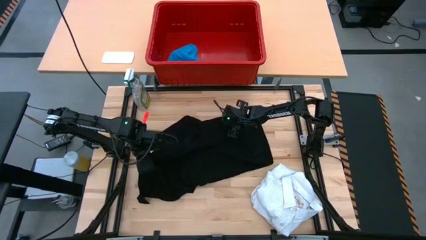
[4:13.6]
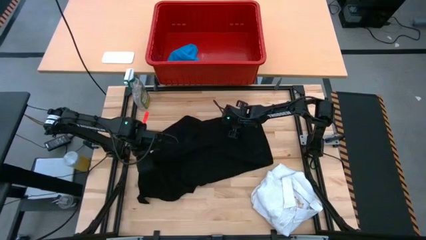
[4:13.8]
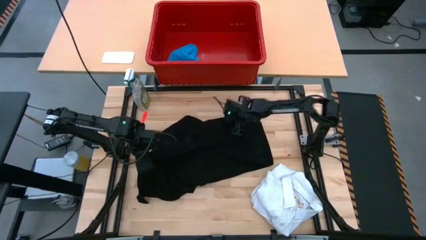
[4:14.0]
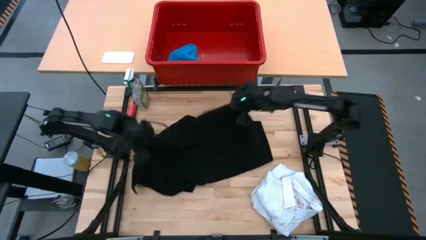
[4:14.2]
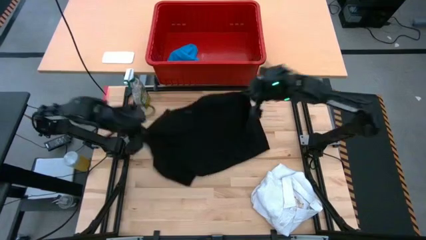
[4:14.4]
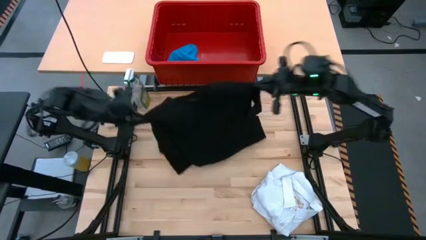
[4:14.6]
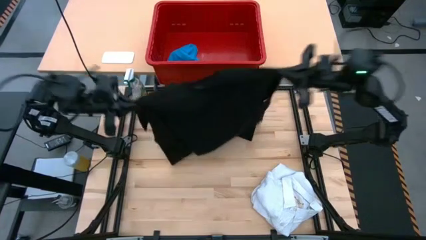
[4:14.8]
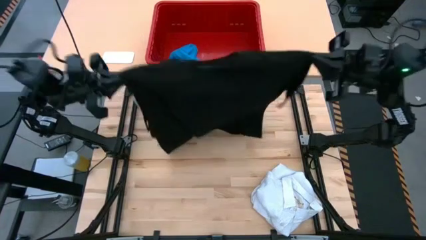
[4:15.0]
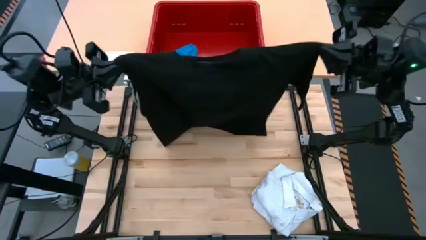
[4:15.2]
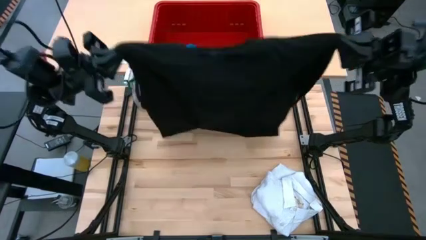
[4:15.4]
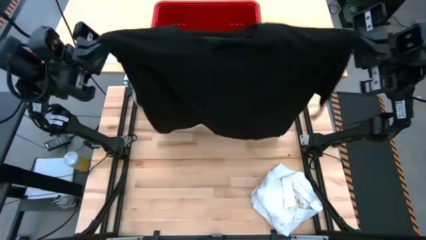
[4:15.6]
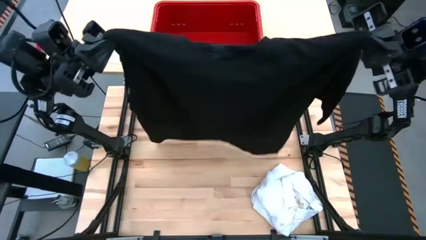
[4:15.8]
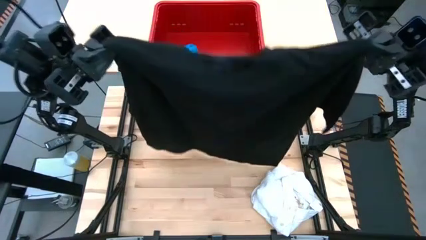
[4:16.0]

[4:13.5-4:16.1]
Task: Fold laundry
Fold the black shirt

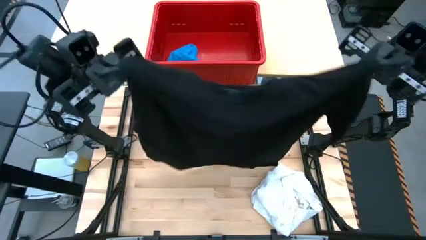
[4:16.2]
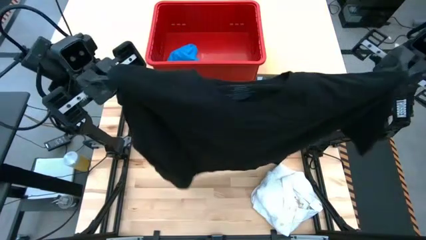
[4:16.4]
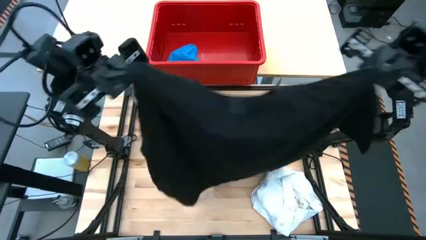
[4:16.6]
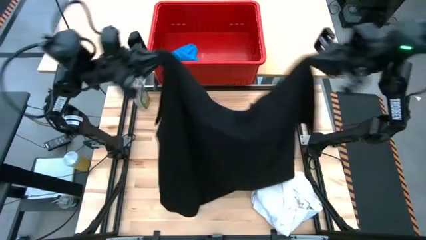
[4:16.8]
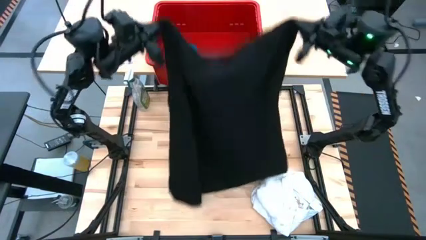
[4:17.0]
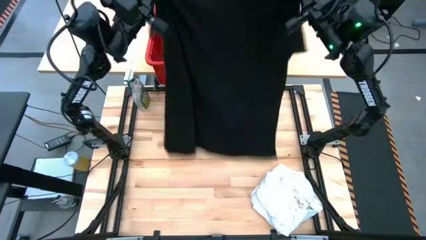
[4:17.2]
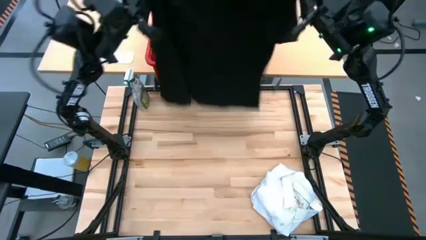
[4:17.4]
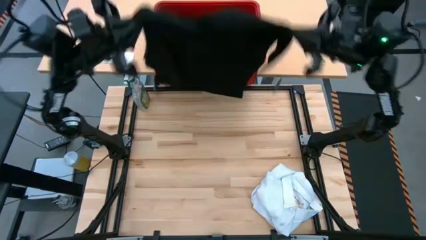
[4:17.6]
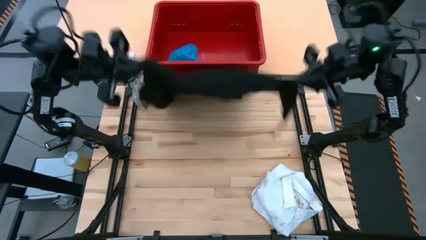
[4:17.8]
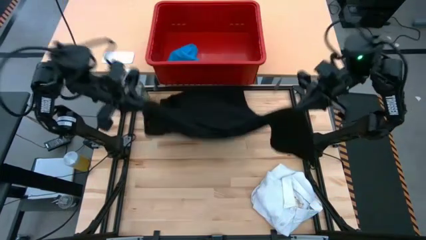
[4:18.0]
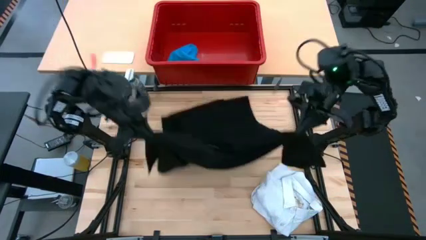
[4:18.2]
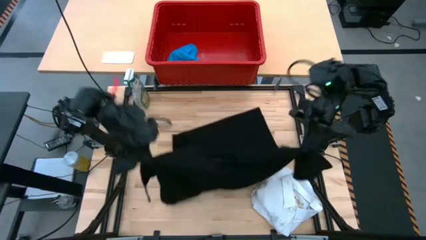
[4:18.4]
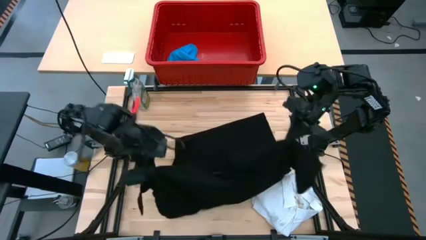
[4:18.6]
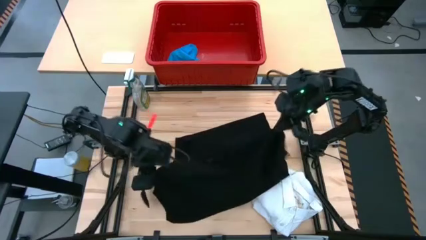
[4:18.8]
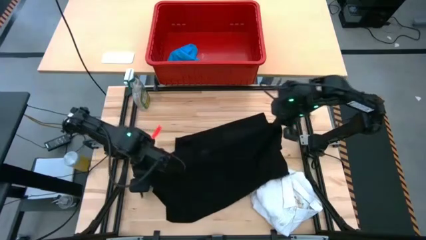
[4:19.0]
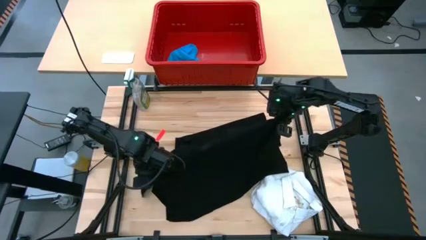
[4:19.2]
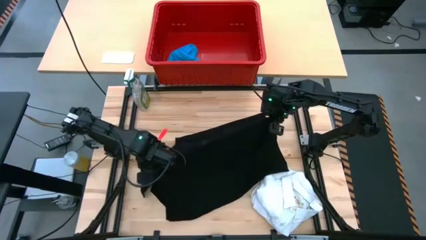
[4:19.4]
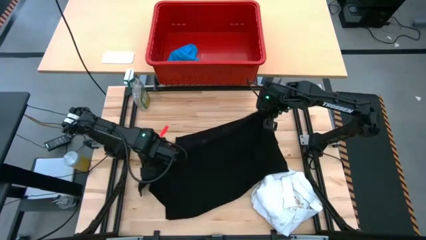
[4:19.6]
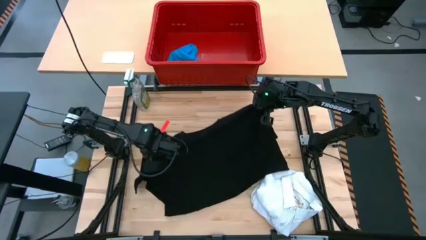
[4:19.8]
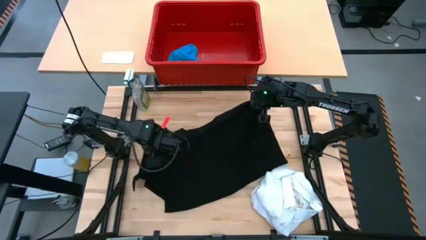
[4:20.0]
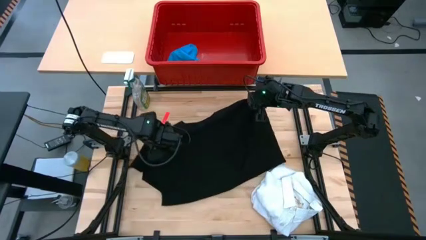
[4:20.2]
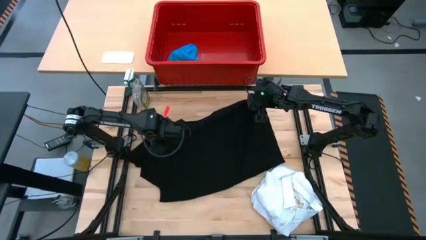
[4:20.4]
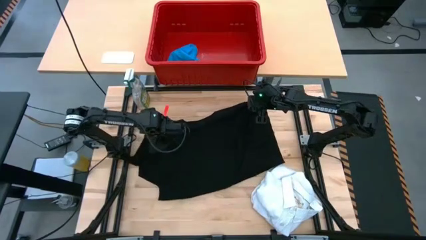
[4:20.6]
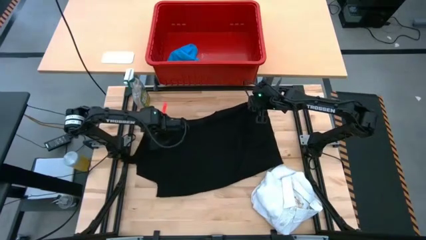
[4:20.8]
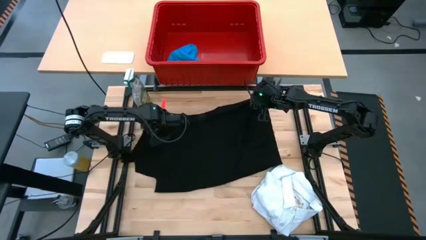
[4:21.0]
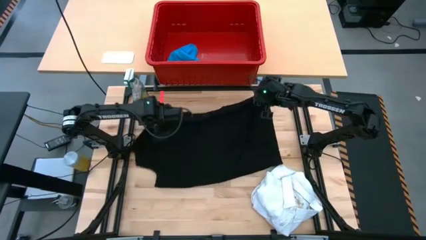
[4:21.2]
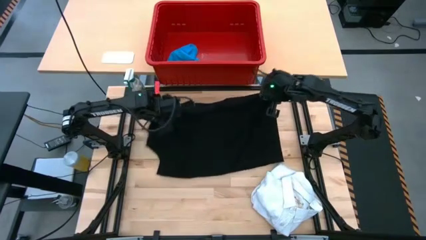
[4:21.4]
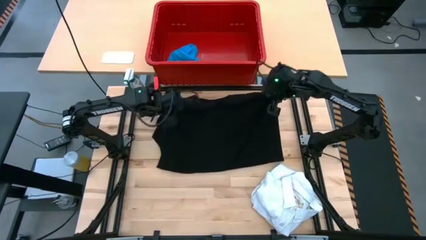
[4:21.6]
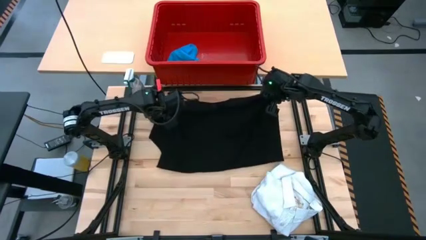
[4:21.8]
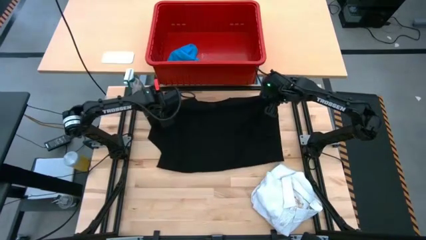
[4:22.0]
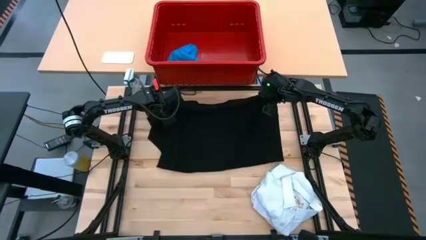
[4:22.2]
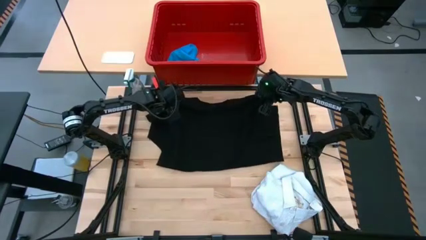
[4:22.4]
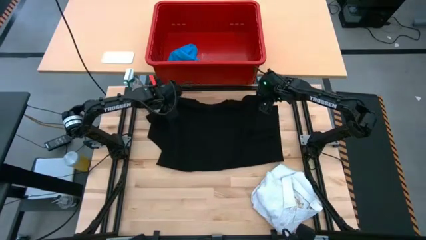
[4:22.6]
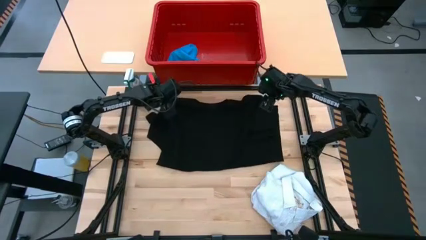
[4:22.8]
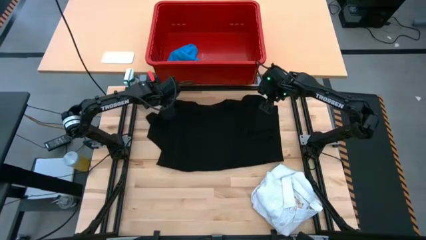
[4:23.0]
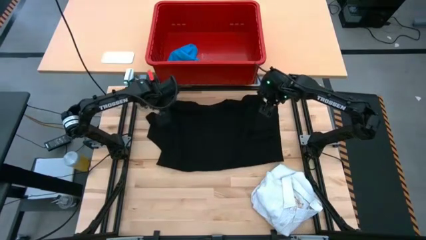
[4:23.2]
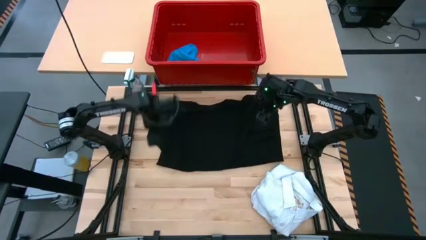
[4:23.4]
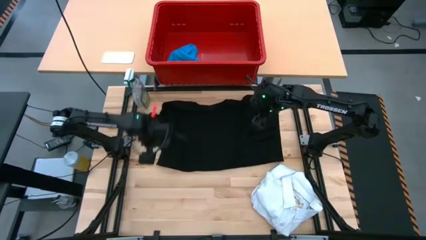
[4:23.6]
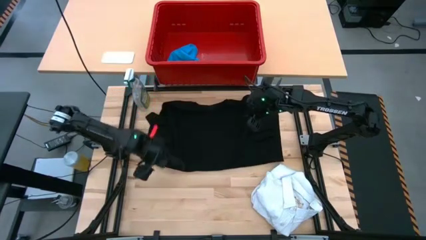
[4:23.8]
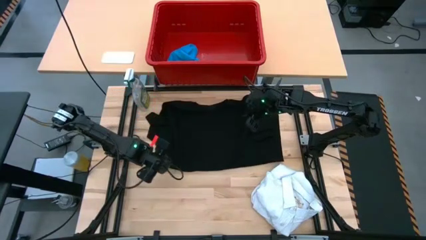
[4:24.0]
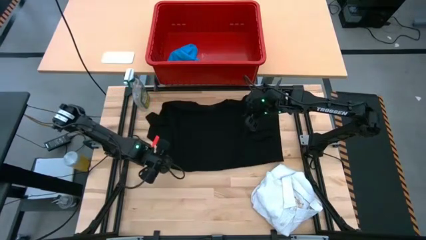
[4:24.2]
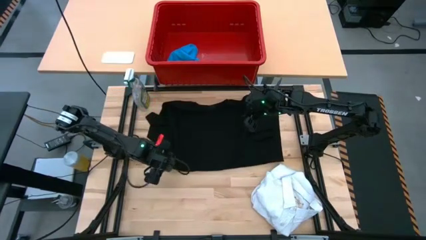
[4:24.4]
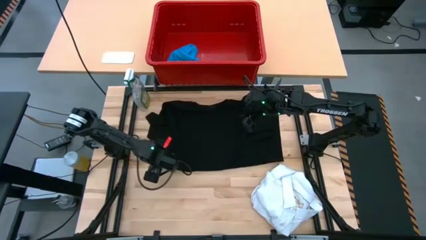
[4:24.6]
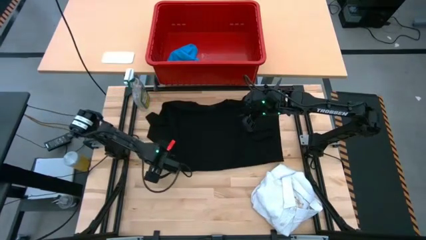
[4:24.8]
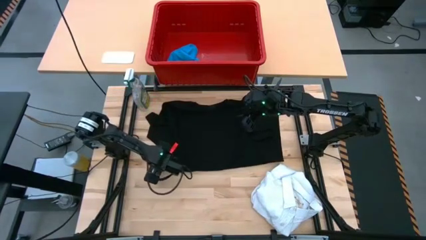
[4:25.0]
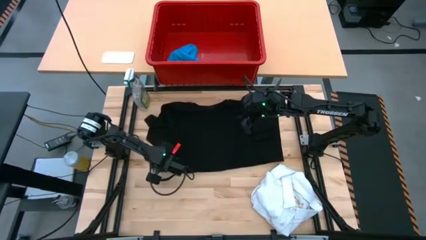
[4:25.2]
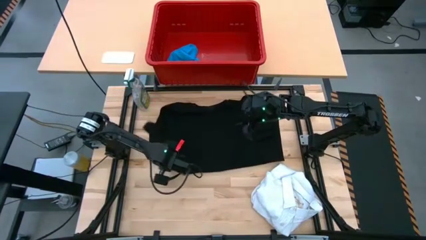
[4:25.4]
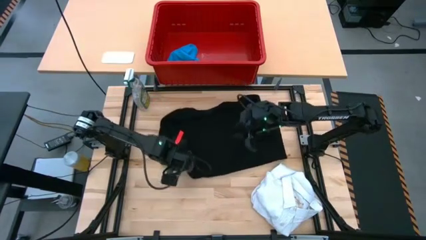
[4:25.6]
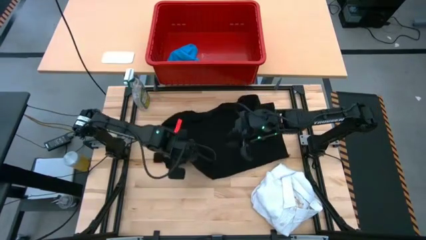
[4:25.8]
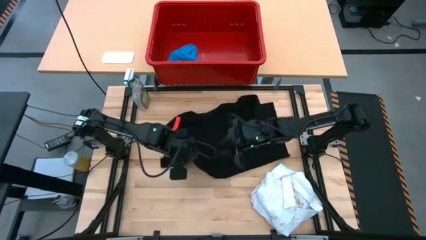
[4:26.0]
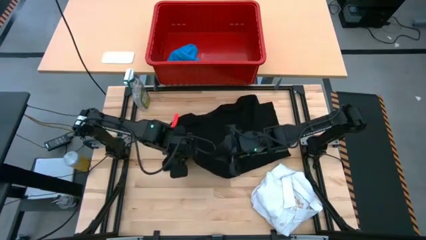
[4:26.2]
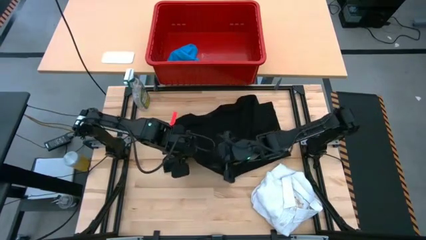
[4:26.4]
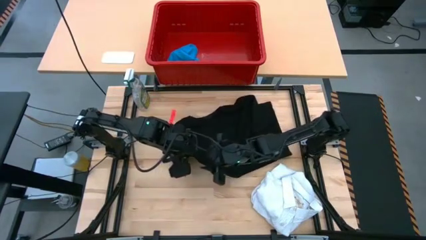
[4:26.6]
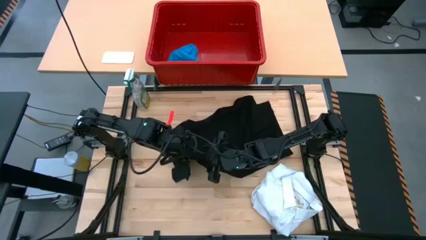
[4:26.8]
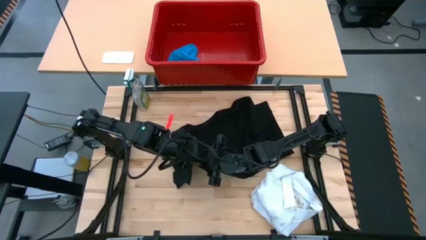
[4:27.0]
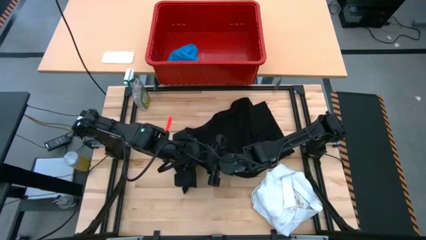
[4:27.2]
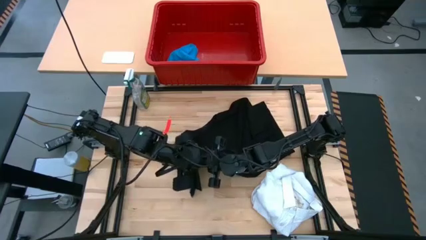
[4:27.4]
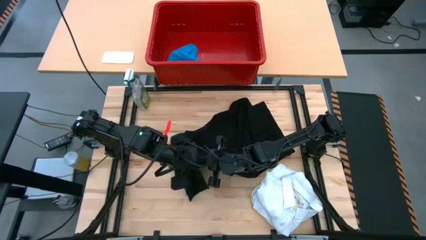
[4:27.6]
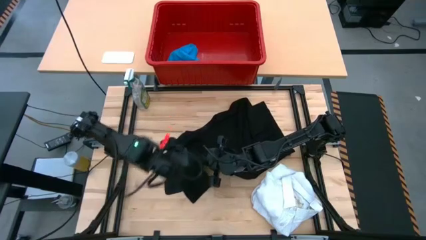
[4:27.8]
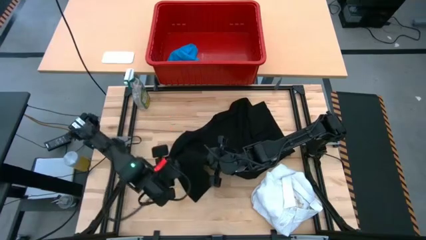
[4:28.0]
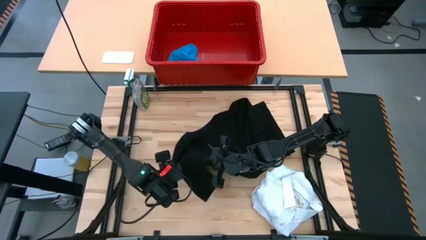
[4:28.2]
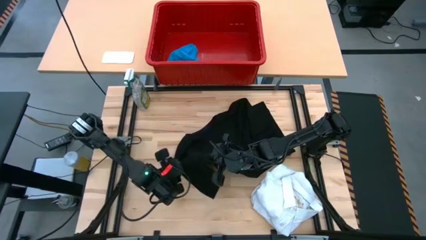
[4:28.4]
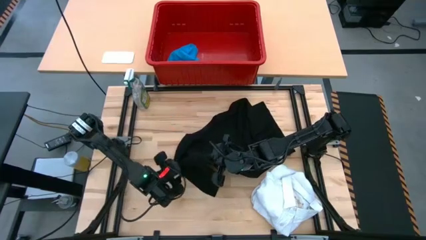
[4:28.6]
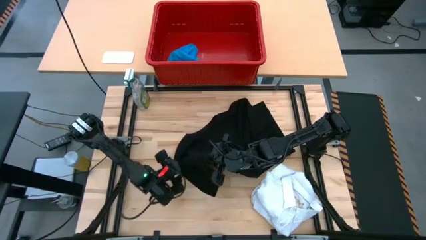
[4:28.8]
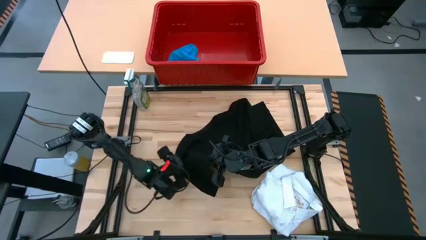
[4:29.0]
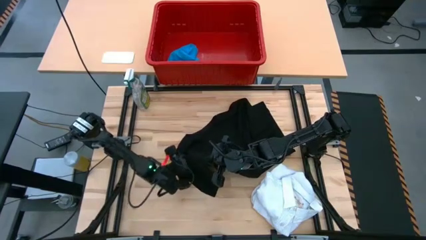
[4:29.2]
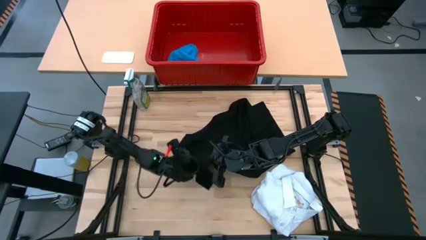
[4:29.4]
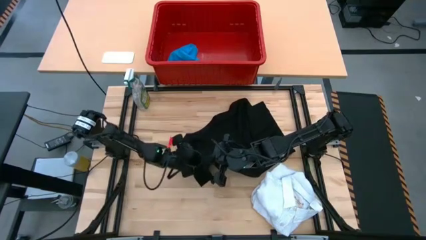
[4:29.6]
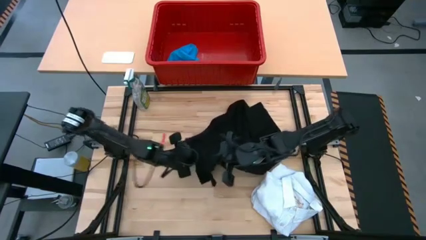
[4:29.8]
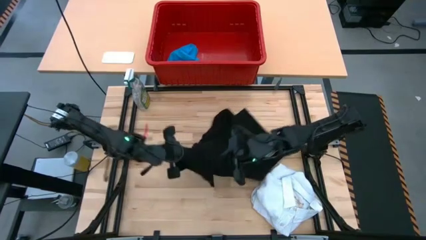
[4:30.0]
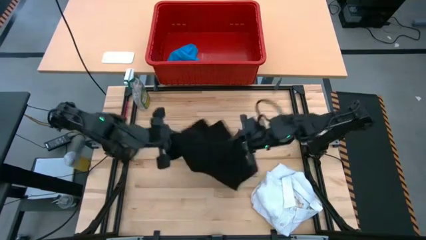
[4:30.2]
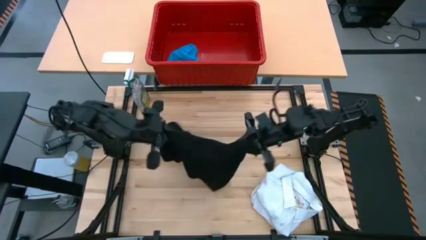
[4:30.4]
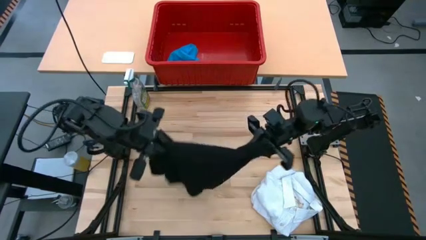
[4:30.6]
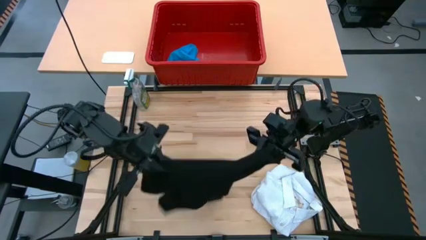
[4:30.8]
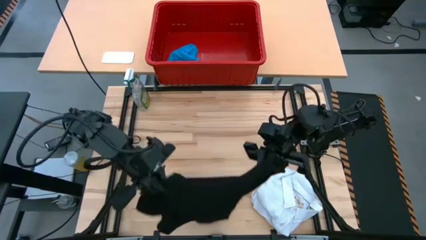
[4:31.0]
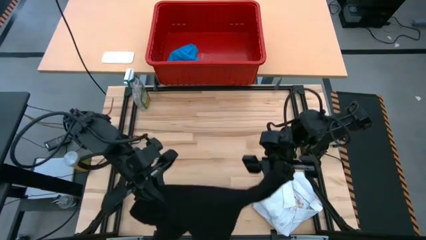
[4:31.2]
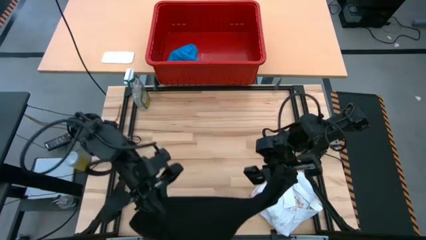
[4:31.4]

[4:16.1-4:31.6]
Fold the black shirt
